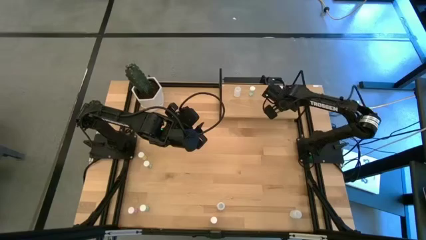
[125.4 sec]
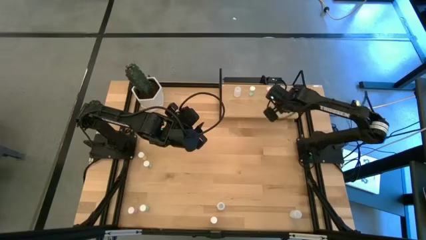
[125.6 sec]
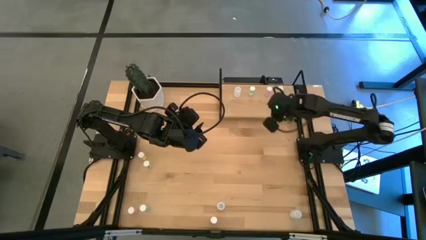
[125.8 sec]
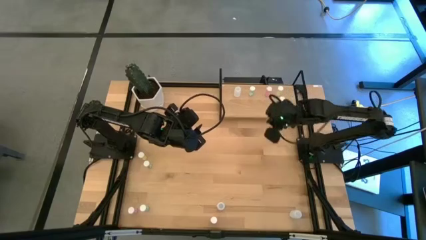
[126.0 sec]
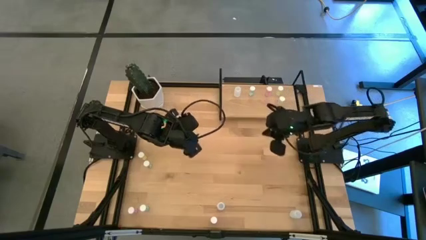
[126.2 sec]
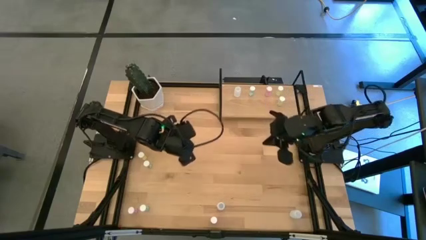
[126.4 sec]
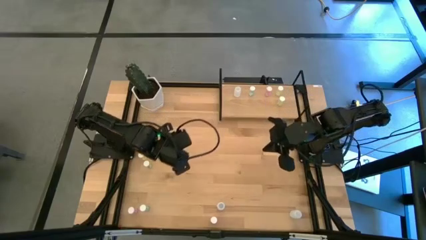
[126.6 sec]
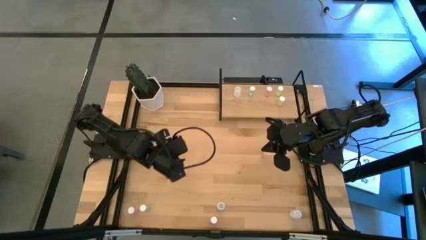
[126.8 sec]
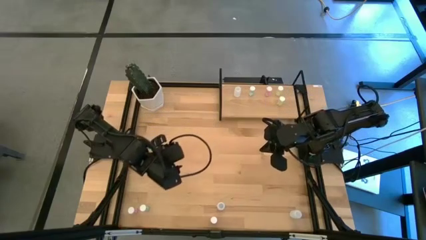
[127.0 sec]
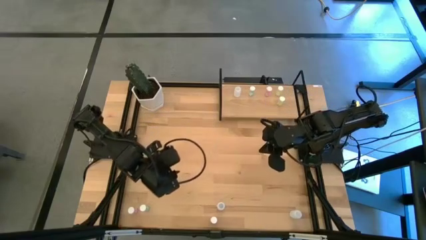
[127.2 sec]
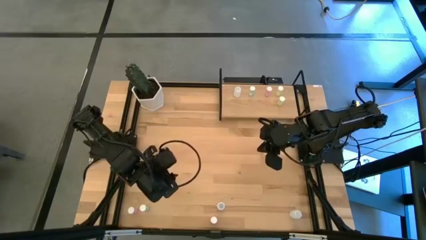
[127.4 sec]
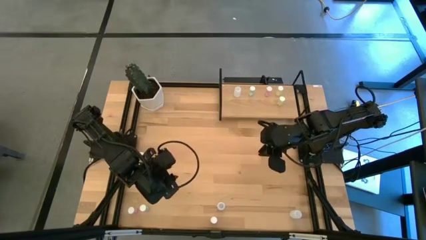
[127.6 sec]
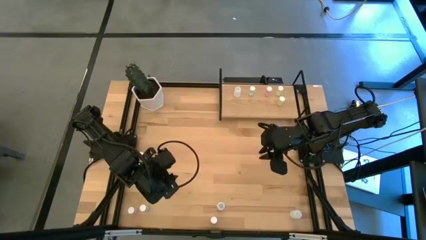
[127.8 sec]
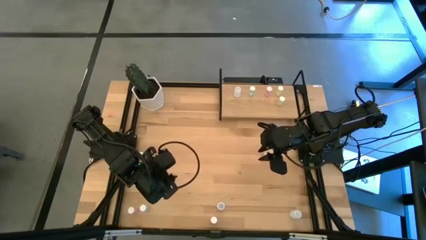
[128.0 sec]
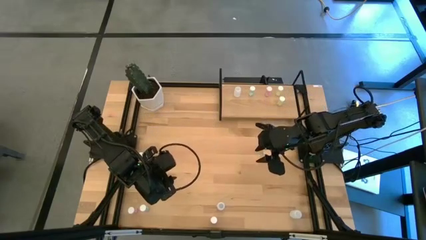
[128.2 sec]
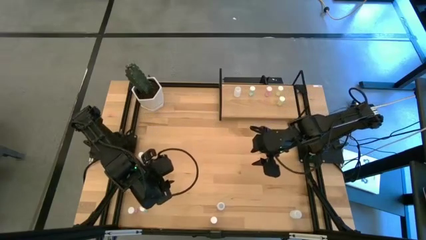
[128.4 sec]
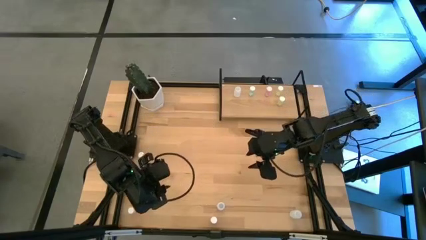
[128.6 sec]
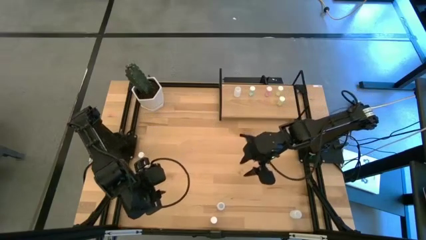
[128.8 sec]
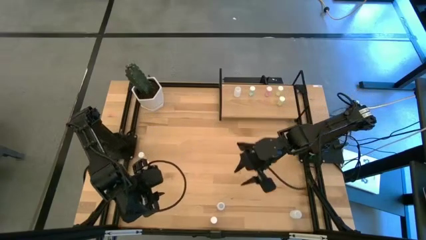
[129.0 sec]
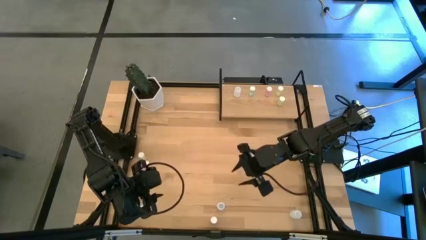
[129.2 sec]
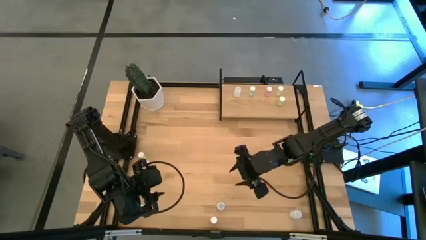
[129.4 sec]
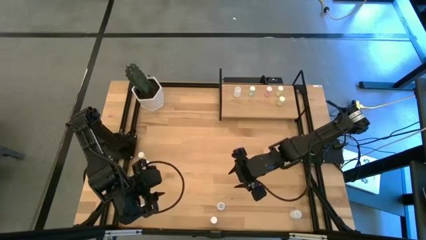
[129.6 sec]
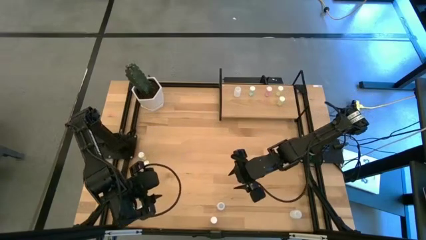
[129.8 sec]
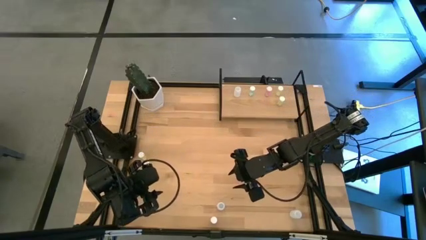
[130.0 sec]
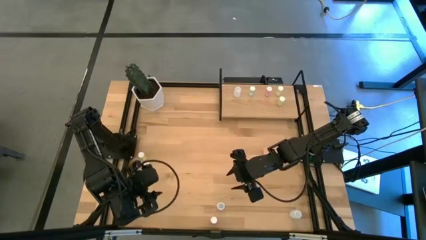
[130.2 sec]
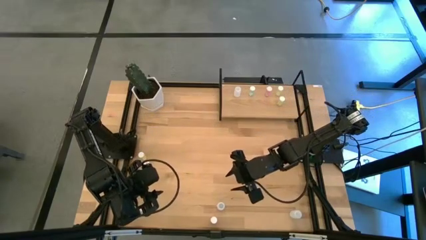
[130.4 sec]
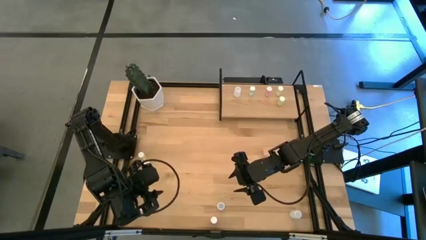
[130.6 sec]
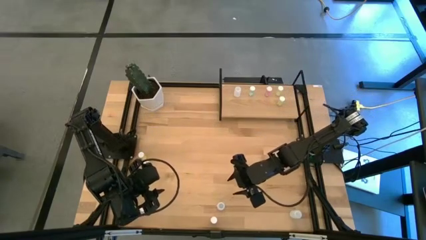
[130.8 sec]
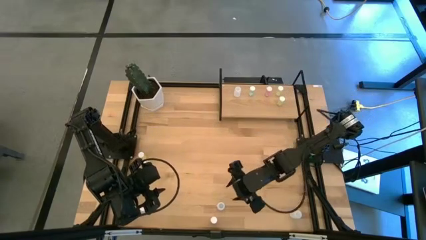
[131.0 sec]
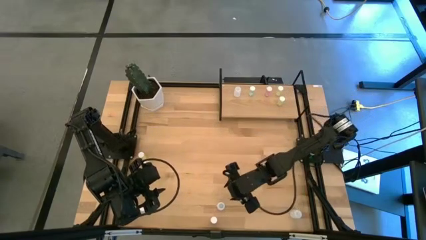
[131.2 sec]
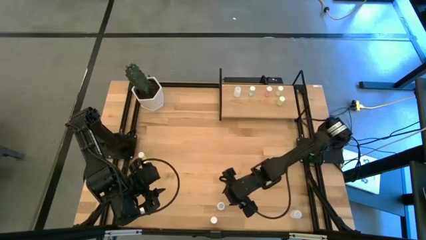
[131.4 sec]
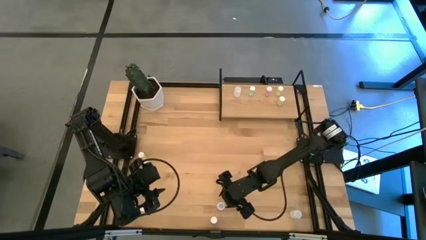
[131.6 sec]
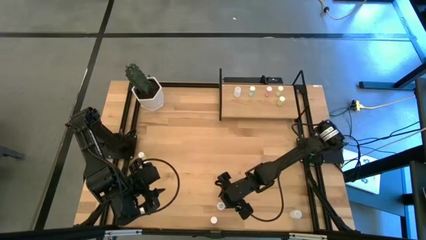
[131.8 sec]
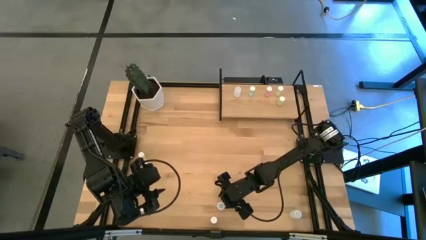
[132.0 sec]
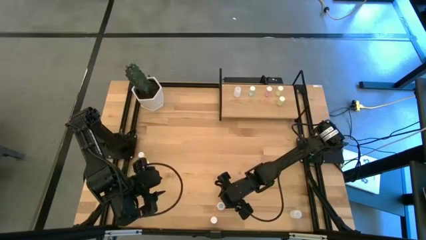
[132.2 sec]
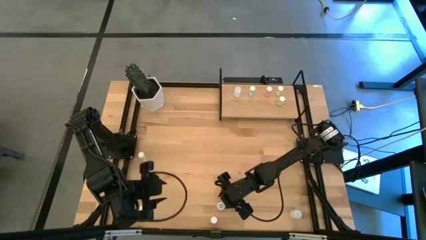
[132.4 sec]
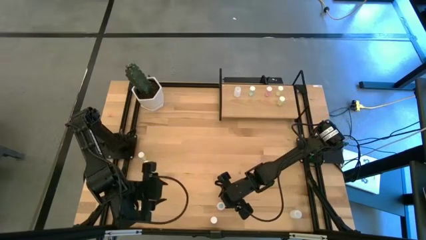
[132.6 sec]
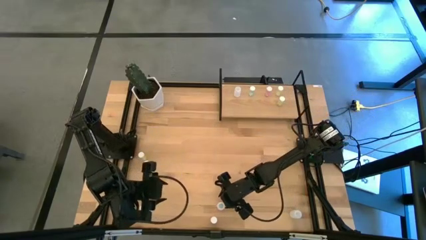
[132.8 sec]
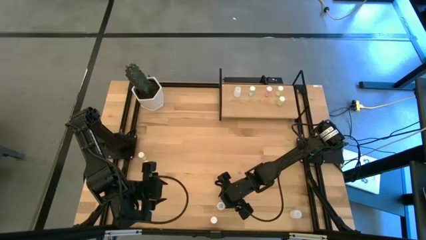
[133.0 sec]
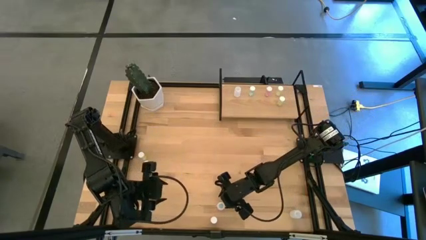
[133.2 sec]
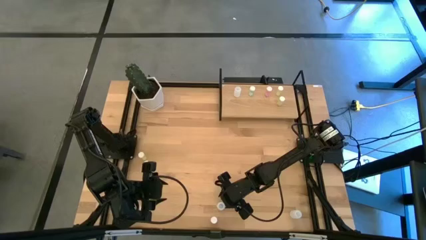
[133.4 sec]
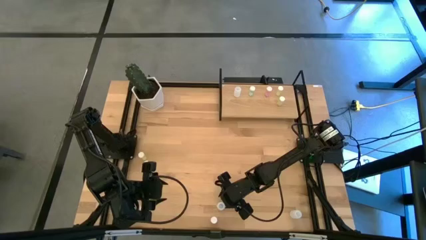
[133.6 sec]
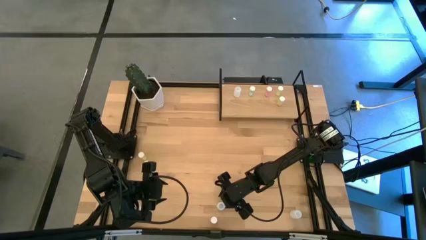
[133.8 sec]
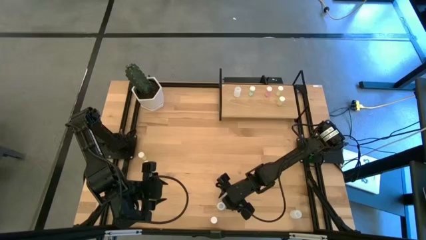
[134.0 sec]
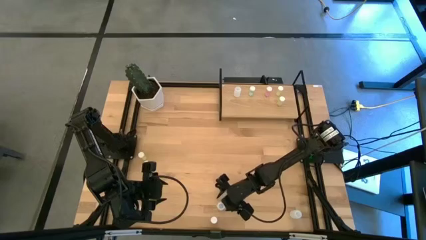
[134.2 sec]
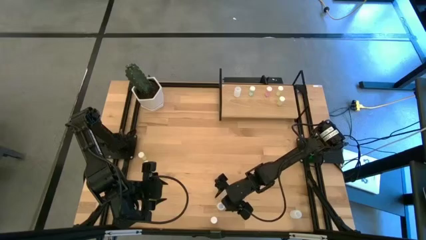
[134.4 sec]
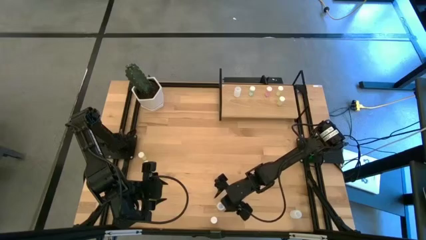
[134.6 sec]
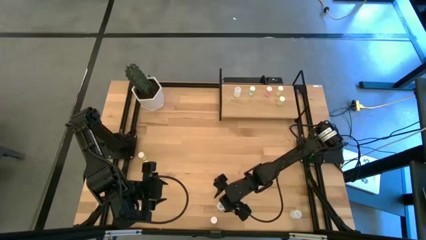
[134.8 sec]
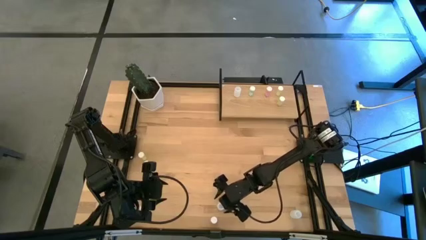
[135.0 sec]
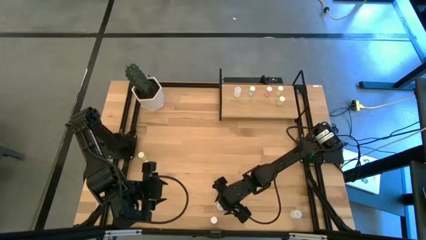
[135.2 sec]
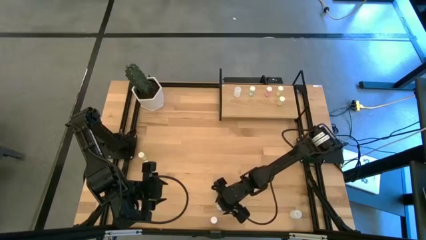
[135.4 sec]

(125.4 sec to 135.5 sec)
Task: Pick and place medicine bottles onto shelf by color
Put the left transparent pill bottle on the shelf aligned with the other transparent pill bottle

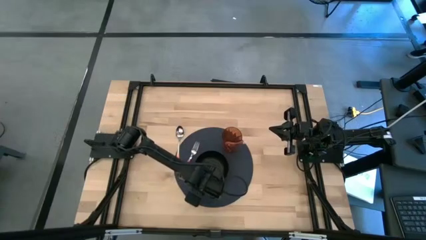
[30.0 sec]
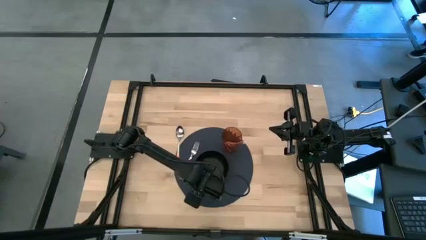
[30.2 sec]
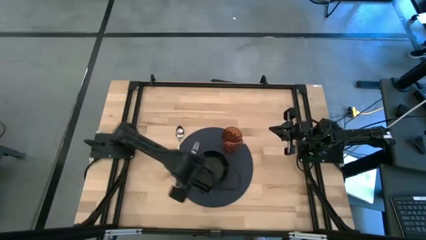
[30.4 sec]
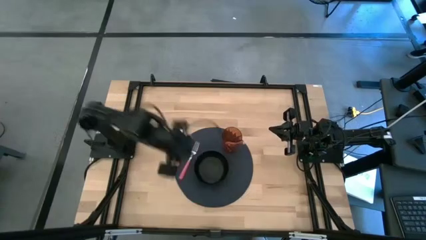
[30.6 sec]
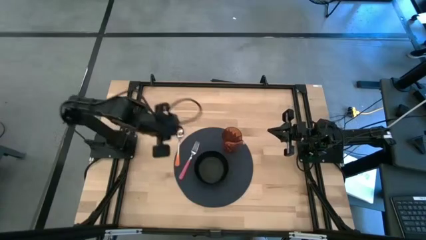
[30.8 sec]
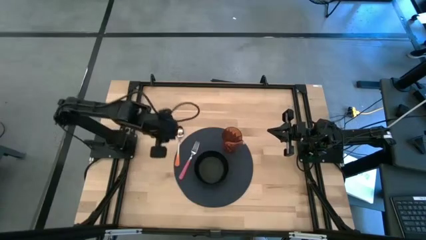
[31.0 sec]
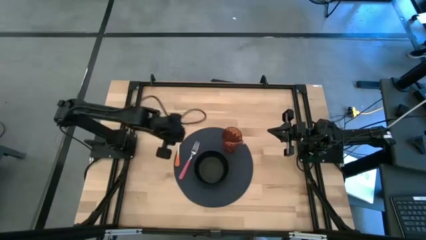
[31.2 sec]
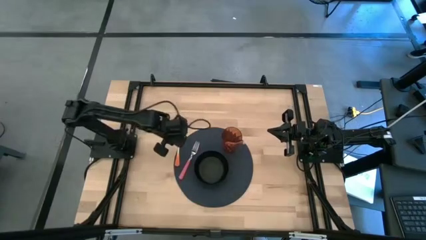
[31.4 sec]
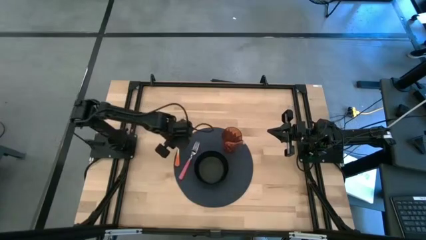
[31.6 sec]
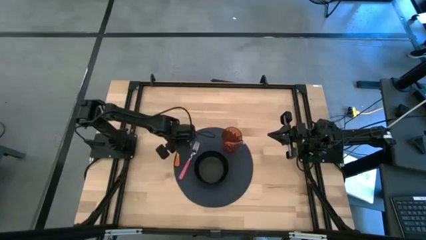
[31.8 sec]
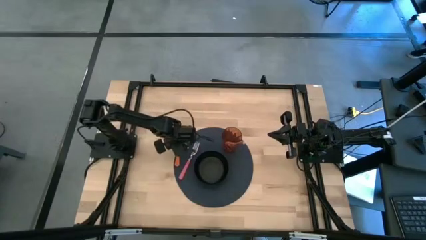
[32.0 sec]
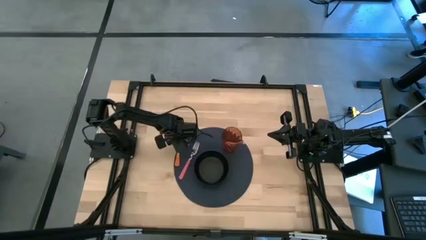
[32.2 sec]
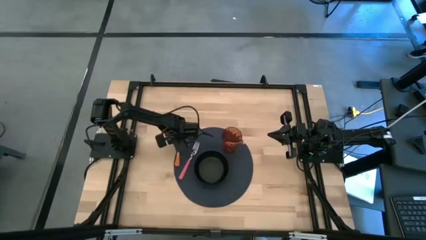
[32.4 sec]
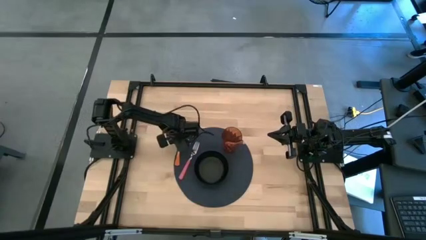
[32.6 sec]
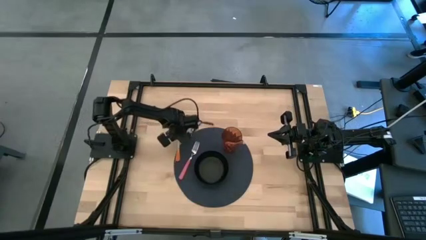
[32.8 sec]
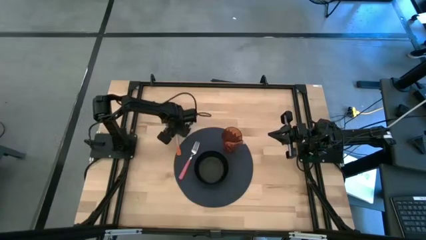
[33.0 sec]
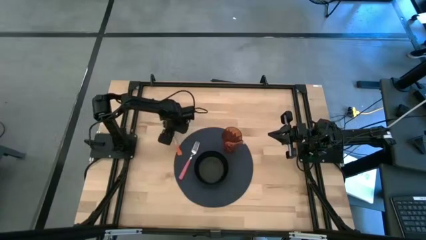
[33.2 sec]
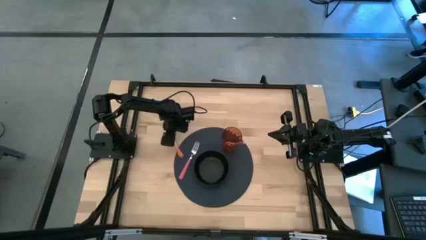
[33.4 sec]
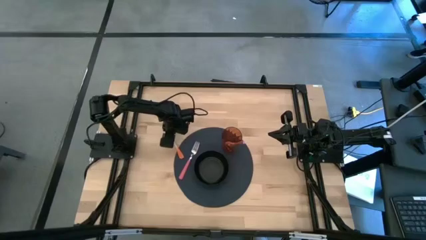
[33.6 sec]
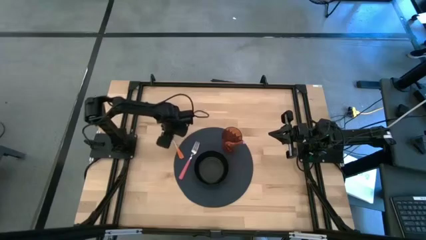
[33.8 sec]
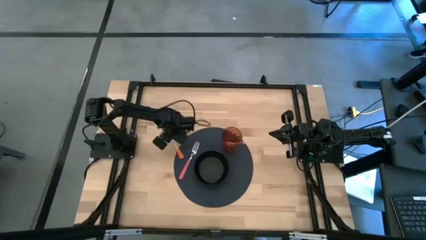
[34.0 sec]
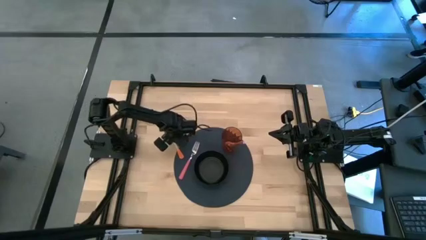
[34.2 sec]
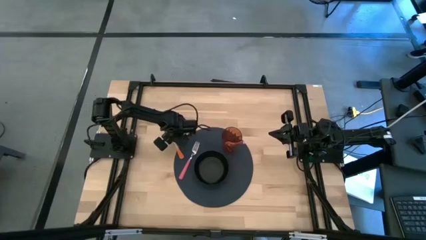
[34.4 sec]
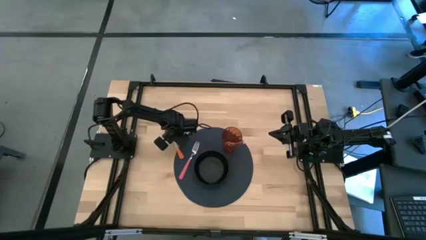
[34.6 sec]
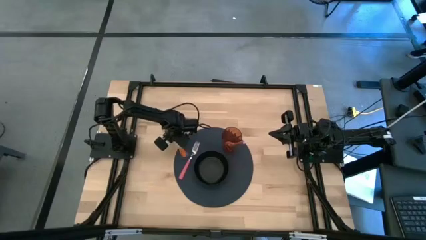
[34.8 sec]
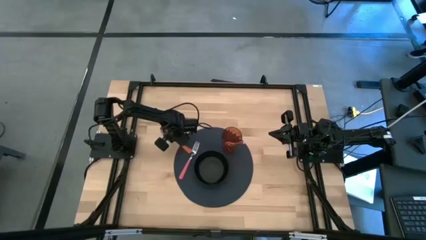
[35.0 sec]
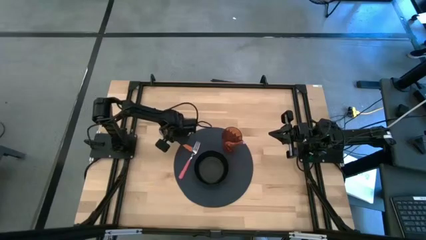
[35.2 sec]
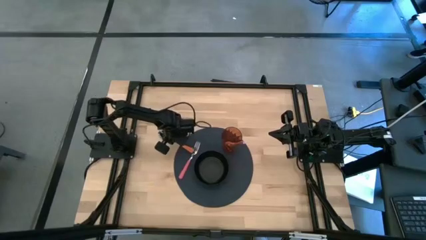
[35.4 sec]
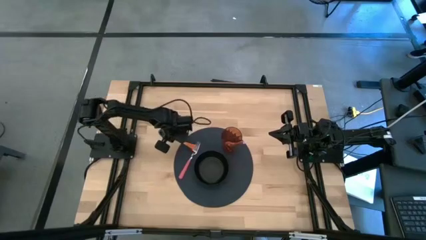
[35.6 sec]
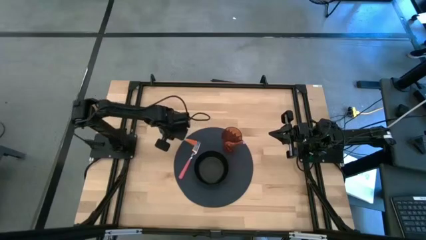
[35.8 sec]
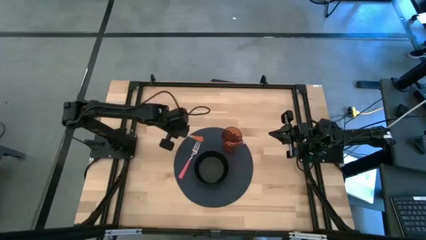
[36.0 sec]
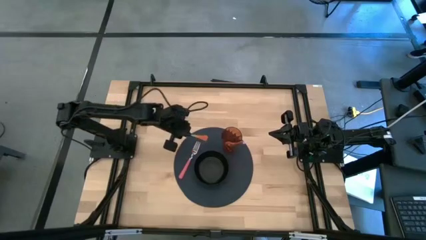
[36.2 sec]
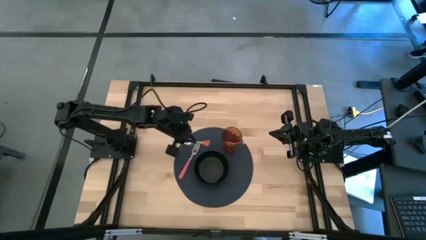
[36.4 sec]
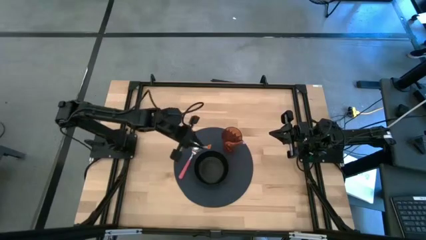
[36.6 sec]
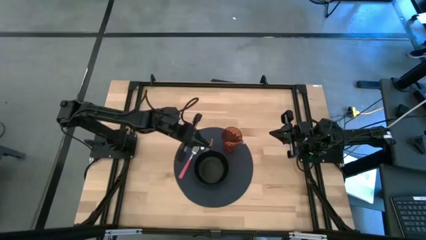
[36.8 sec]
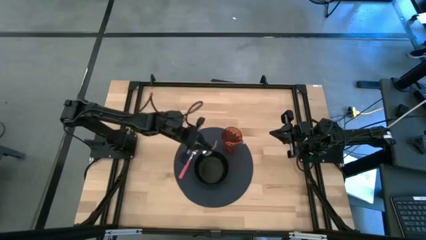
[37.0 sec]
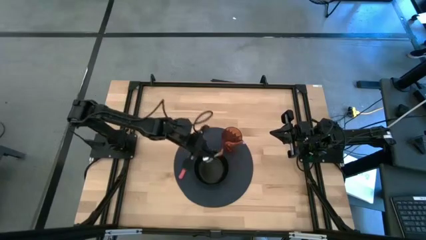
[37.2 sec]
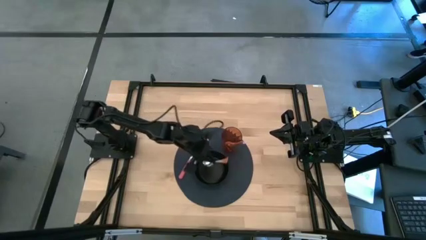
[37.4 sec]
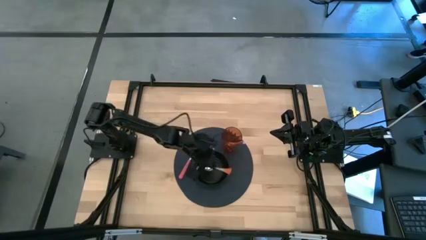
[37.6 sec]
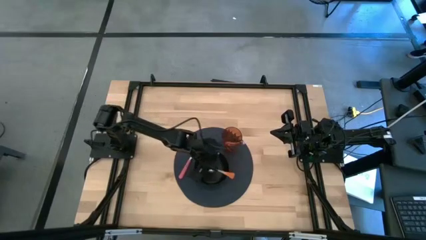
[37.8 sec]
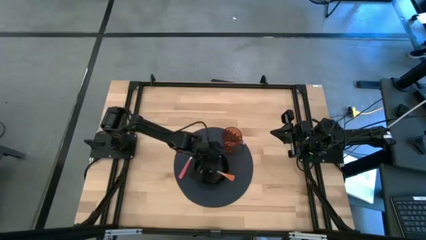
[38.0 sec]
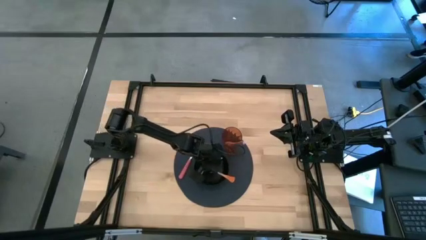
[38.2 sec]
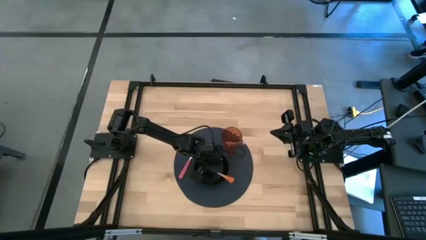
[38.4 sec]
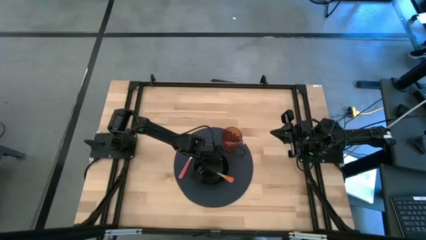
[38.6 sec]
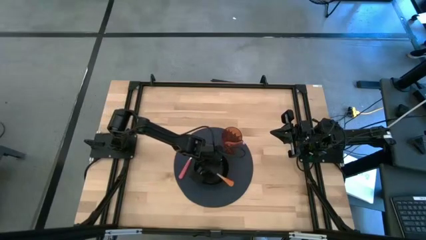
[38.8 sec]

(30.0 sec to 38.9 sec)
Task: Pick & Place Utensil
Put the orange spoon into the black bowl
